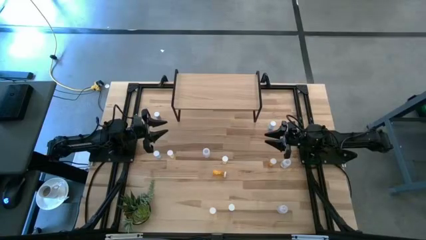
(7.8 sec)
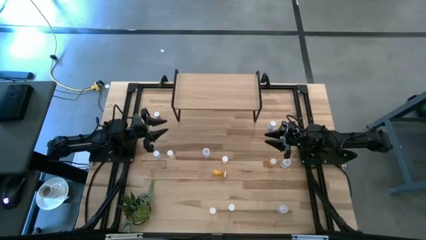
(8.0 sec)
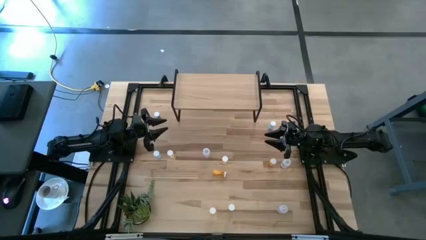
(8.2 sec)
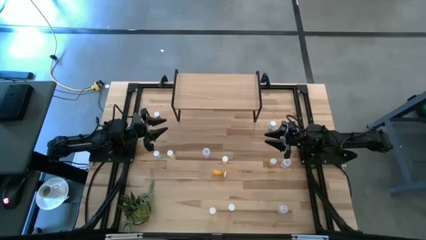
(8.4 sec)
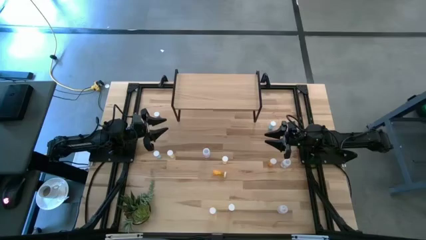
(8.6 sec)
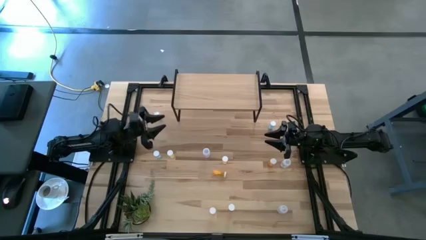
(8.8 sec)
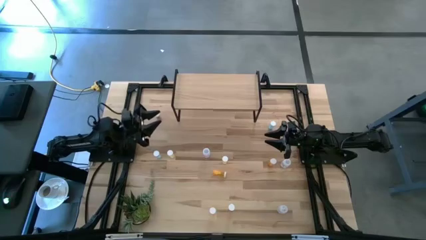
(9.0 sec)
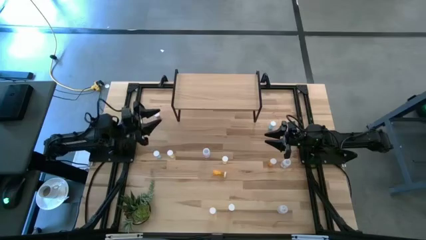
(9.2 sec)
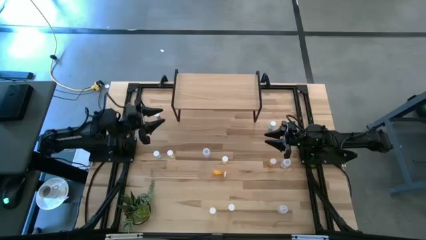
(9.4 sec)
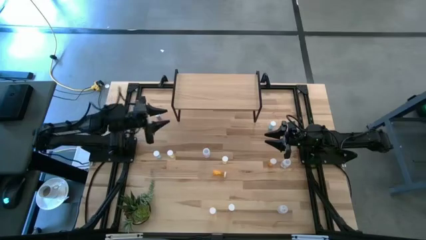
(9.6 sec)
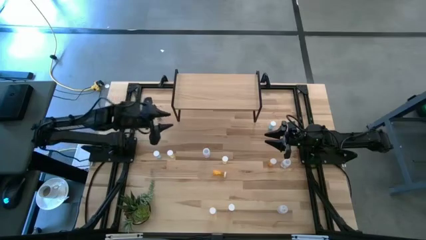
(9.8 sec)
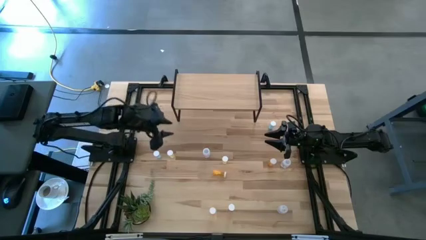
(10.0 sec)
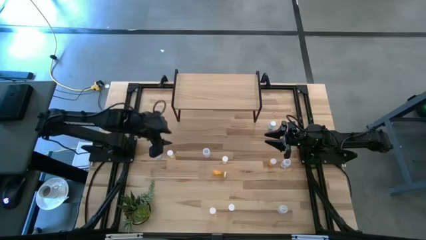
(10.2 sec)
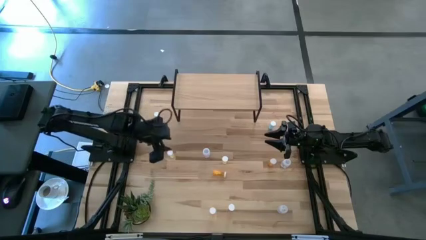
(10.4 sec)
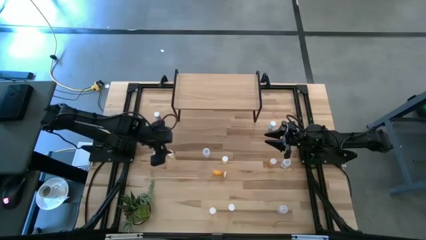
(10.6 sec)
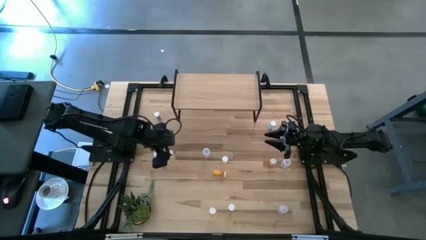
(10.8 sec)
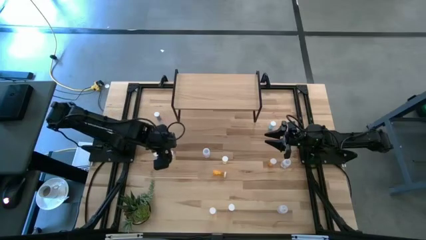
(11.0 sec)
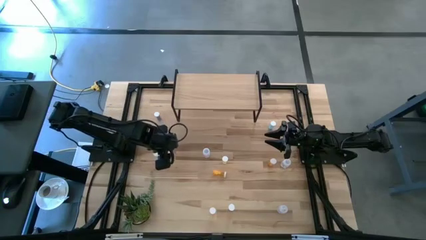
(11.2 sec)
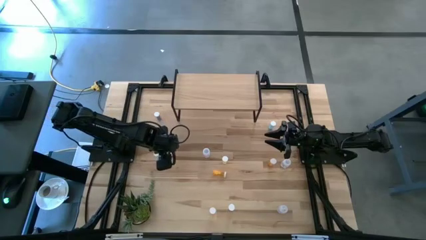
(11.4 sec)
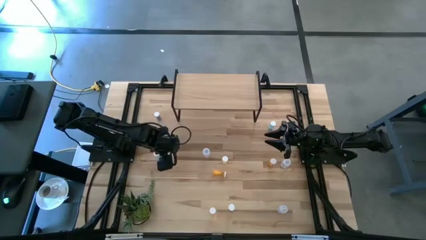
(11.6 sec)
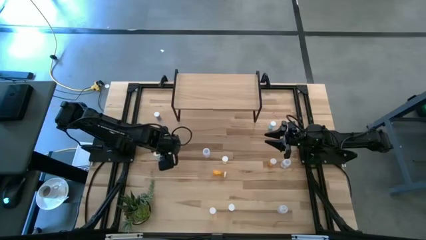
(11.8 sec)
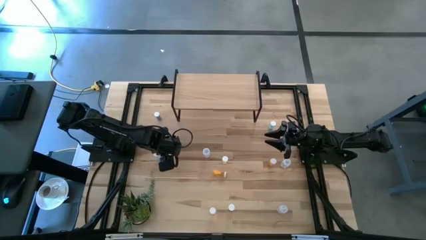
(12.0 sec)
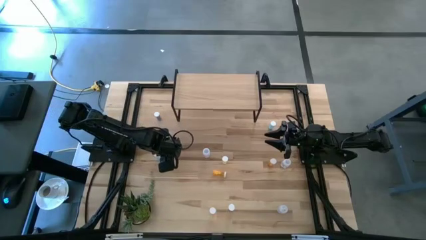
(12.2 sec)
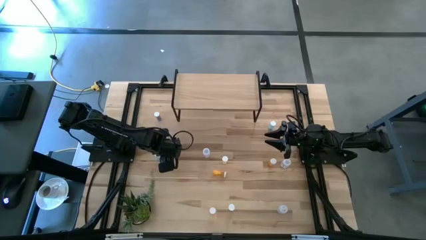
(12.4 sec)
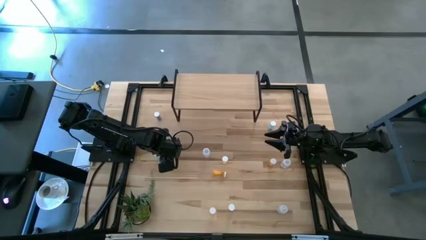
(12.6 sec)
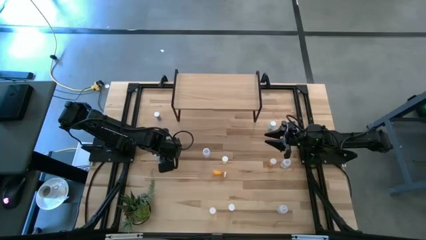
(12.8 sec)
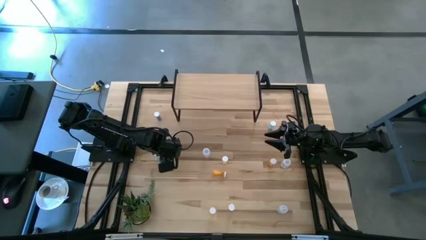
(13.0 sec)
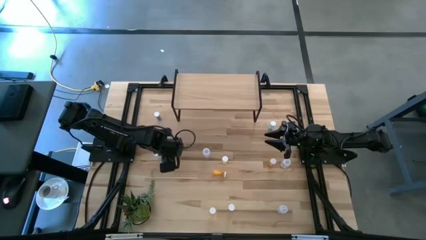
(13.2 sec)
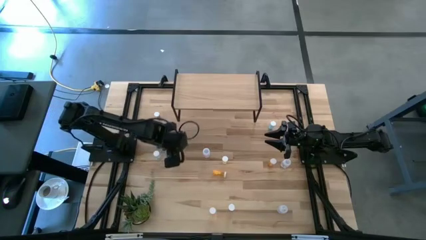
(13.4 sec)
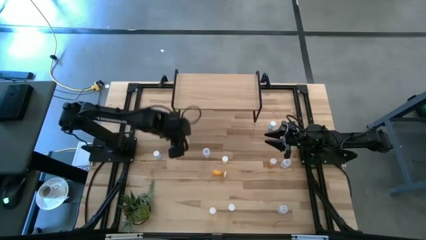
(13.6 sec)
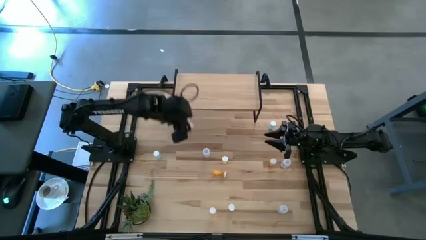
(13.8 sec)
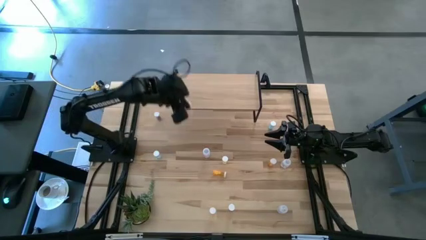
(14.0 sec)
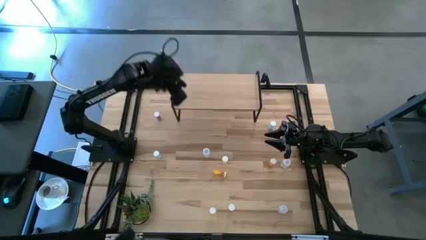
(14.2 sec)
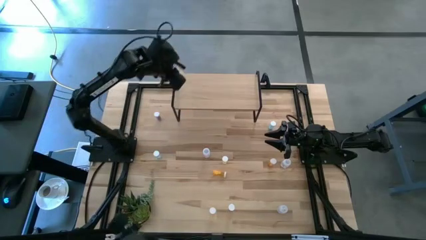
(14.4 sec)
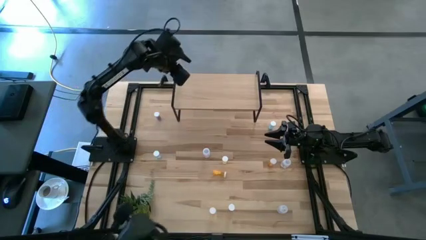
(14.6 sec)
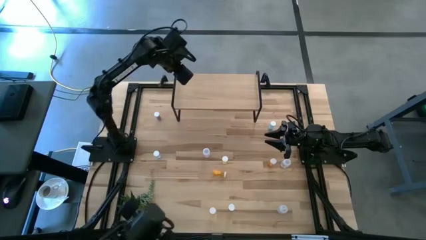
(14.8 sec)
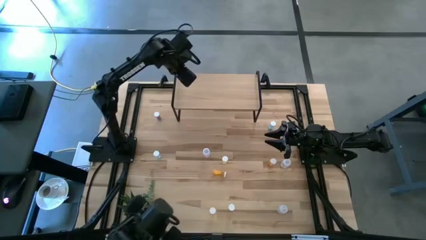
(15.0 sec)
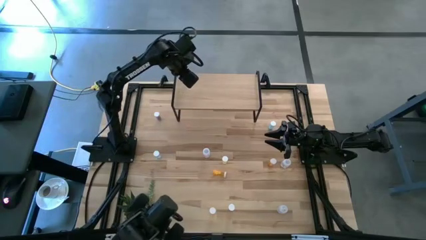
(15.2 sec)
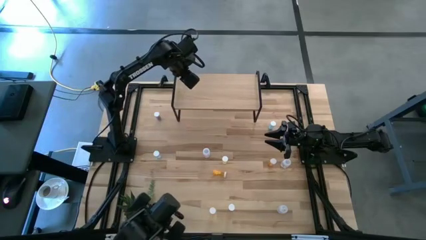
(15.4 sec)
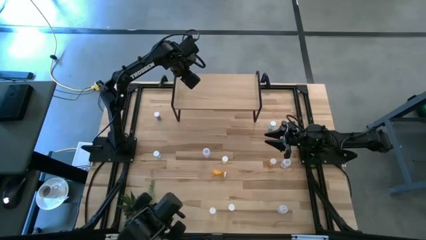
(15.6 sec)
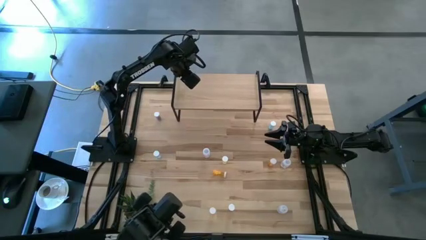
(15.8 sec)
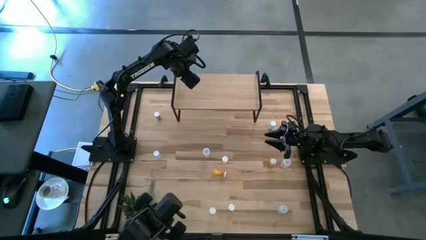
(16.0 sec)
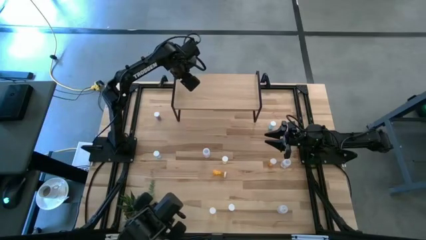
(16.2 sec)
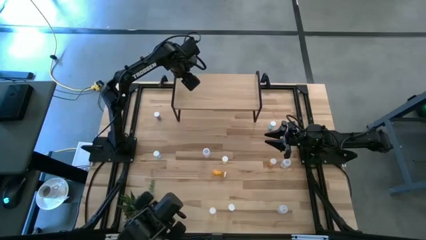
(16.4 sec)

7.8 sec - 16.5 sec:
Task: Pick and place medicine bottles onto shelf by color
Put the top left yellow pill bottle on the shelf

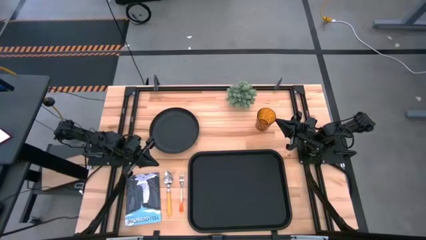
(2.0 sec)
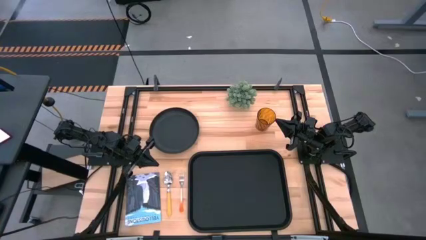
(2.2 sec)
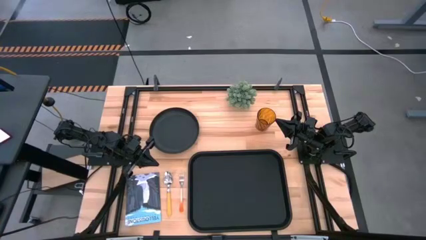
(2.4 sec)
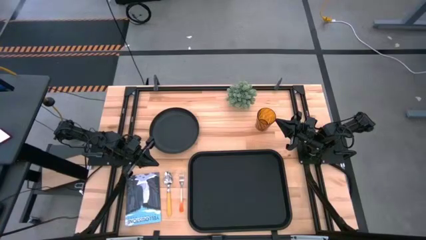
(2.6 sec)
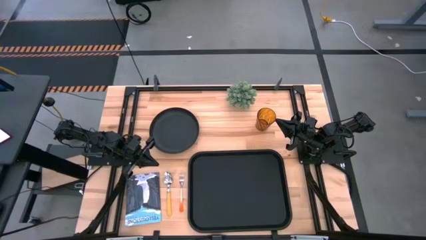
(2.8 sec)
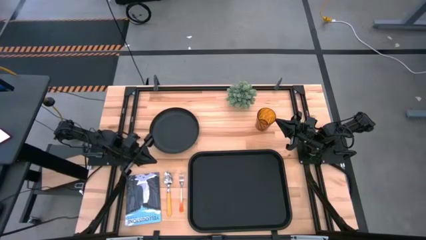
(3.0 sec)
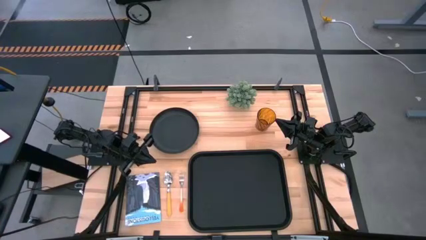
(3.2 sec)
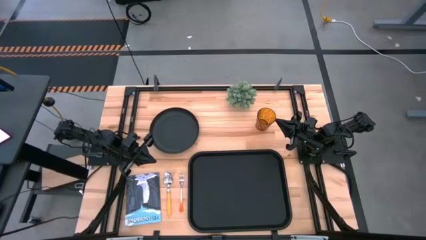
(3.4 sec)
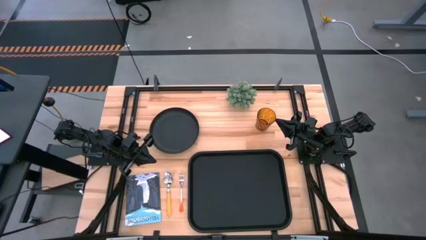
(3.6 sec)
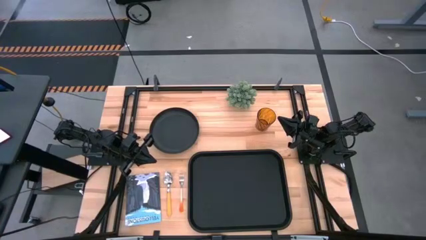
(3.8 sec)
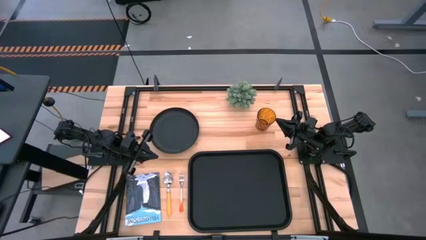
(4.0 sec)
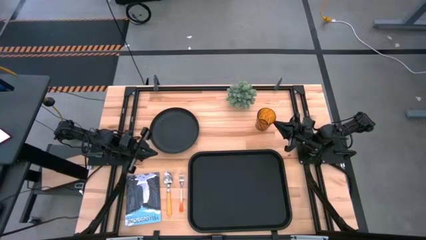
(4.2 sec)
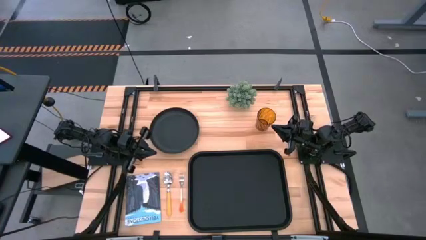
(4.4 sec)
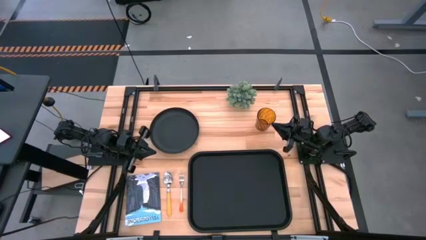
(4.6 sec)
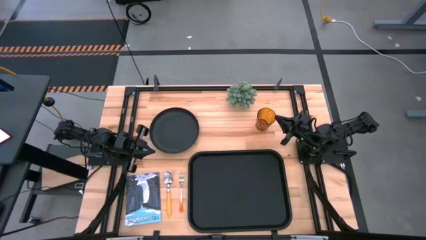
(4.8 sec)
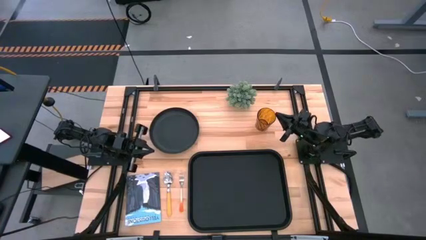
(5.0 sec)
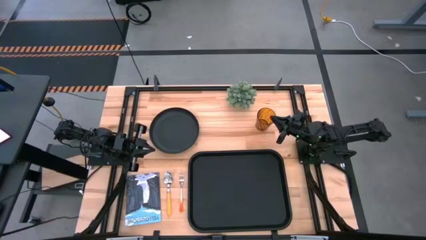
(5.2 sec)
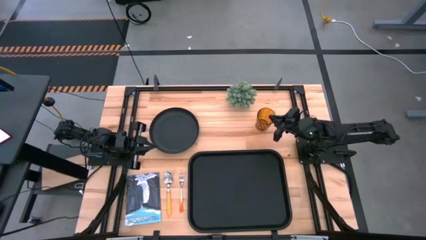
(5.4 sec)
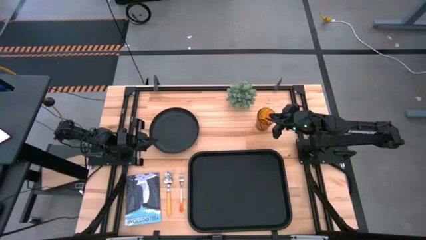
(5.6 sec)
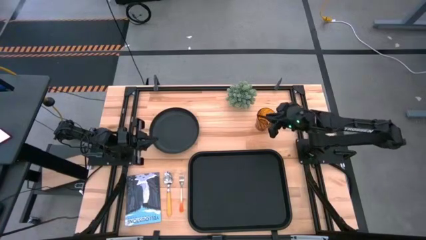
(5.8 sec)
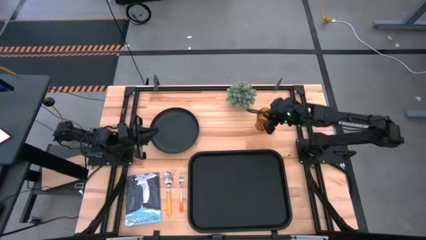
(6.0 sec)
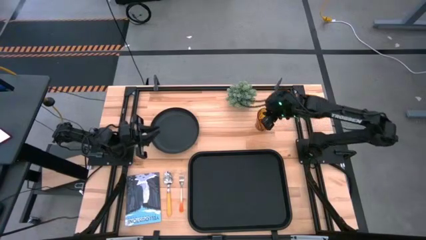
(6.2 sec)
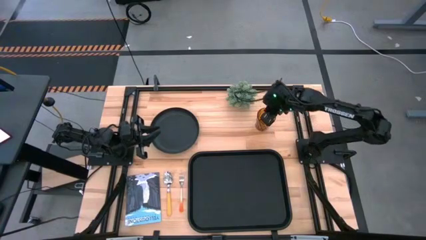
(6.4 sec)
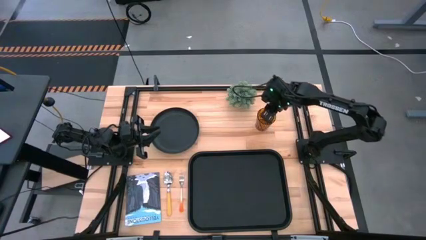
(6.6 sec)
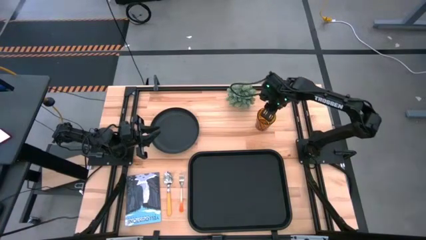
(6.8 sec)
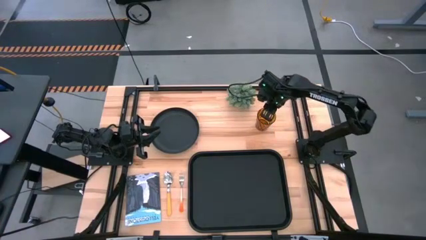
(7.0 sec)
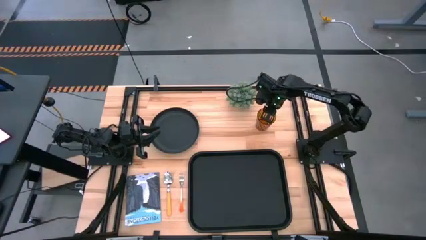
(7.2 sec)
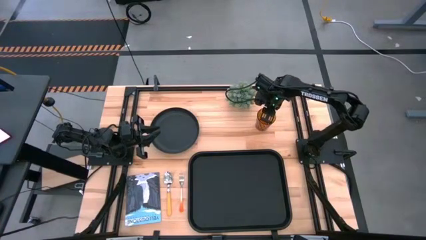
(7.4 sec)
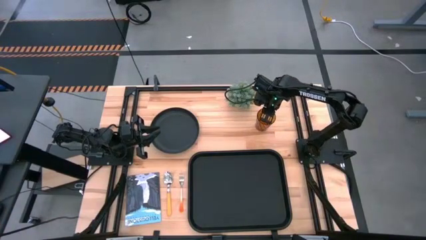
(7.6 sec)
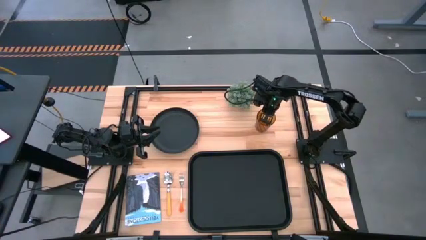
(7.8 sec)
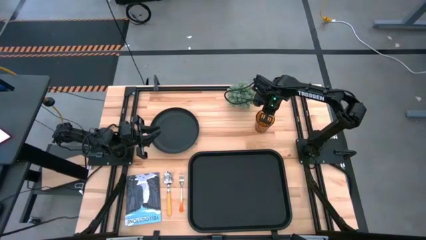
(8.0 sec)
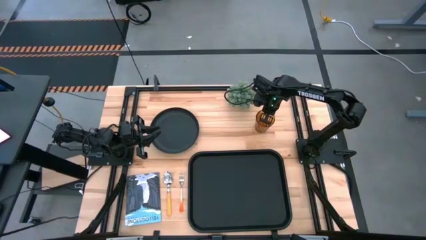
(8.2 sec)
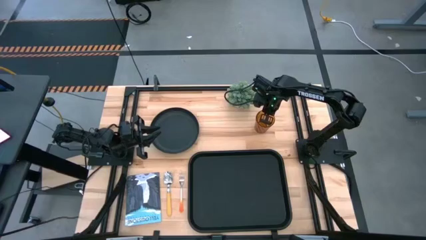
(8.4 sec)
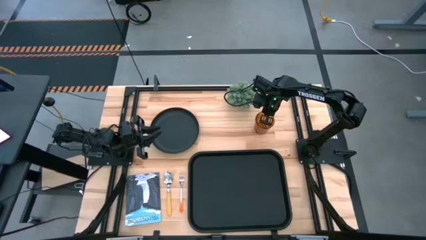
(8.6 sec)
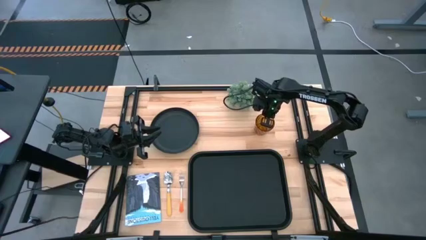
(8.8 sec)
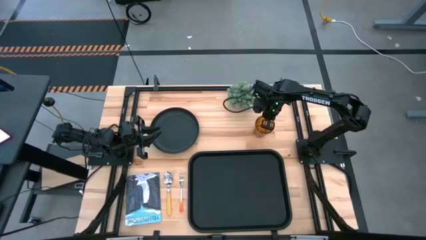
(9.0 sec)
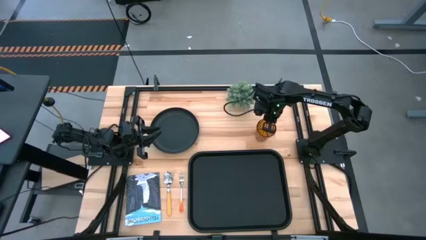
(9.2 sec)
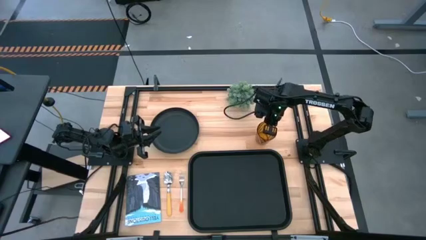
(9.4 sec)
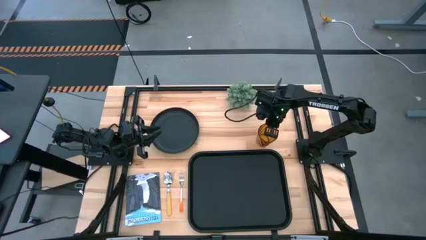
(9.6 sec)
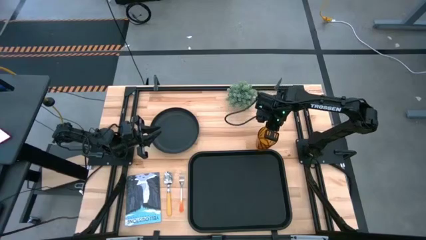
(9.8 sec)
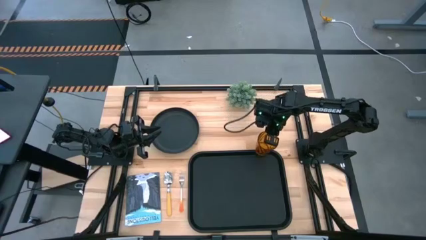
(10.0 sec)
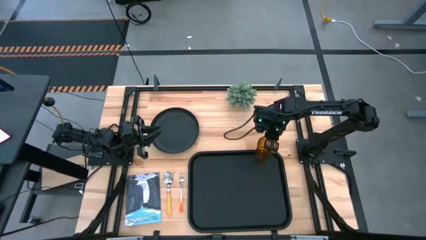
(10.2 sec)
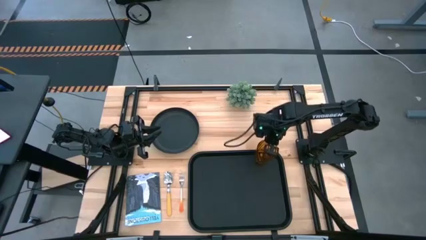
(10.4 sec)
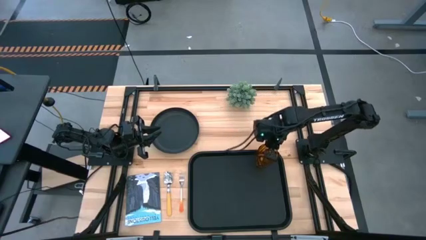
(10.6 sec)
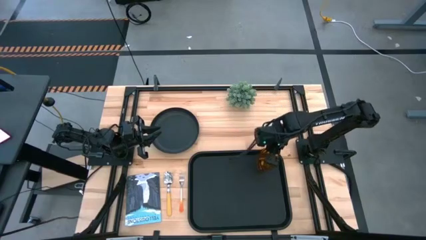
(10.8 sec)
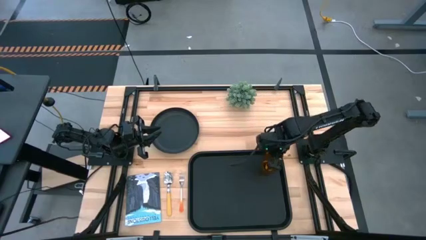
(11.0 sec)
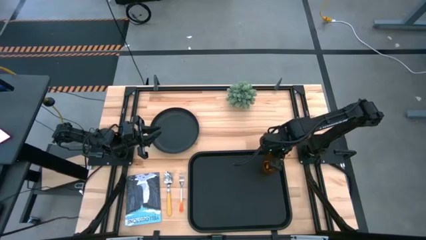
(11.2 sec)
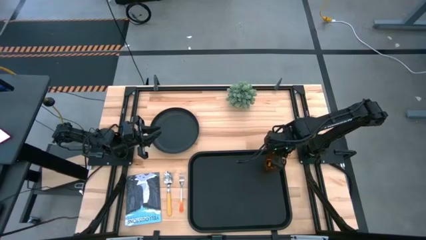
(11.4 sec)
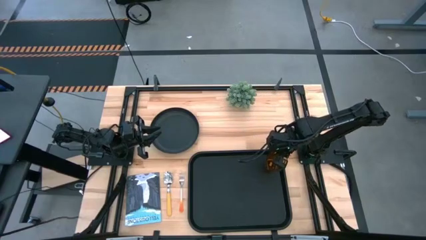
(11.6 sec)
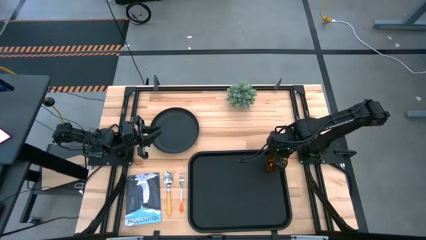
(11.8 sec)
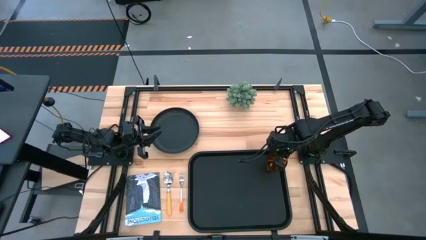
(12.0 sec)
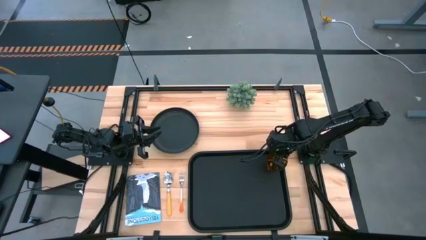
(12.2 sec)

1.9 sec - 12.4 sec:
Task: Pick and place plate/cup/fork/spoon on tray
Put the brown glass on the top right corner of the black tray
